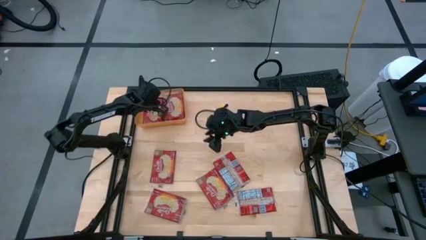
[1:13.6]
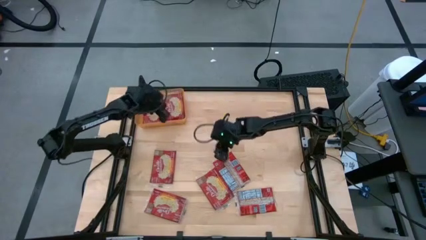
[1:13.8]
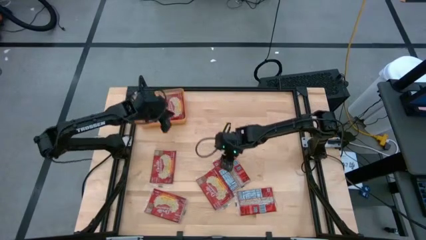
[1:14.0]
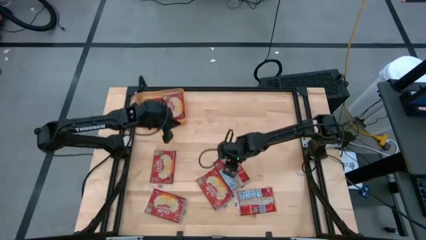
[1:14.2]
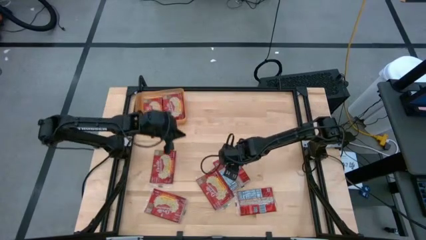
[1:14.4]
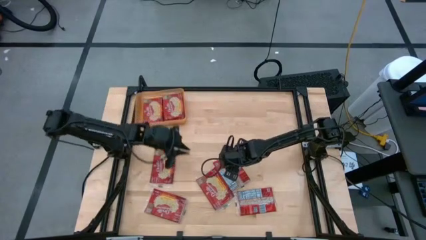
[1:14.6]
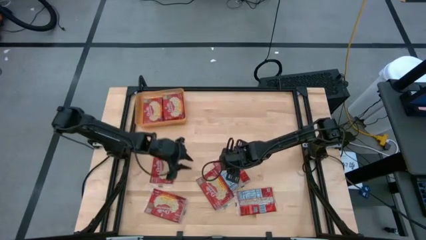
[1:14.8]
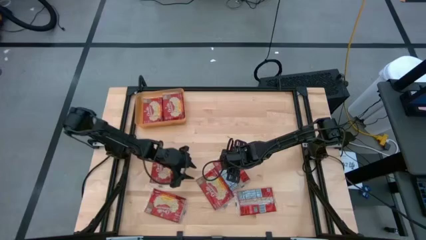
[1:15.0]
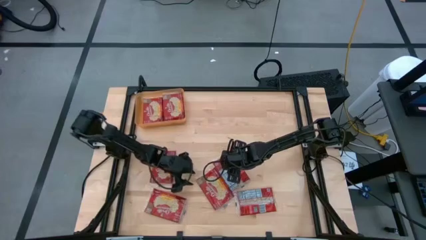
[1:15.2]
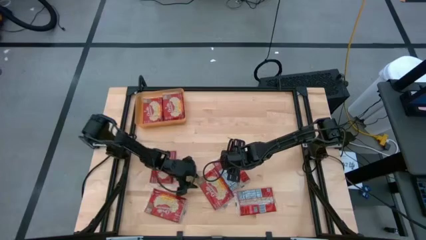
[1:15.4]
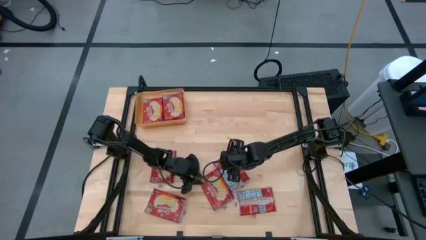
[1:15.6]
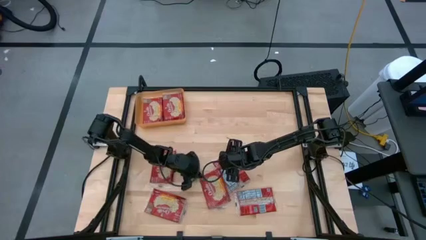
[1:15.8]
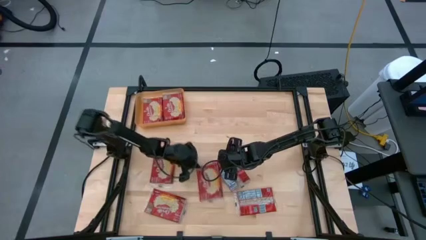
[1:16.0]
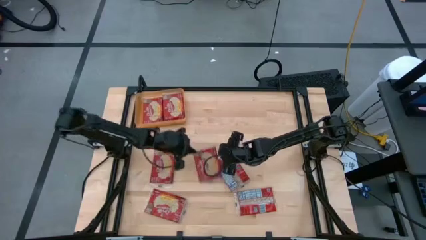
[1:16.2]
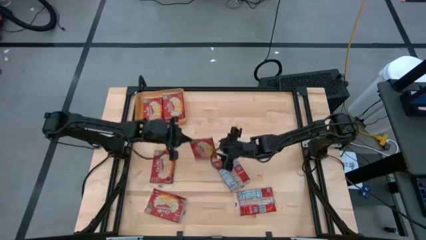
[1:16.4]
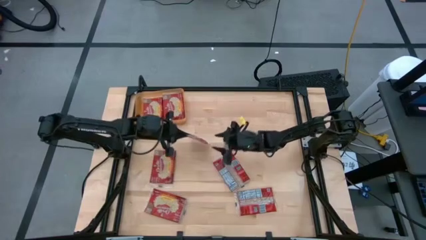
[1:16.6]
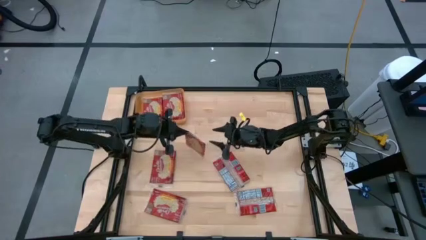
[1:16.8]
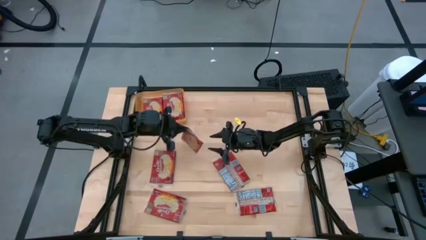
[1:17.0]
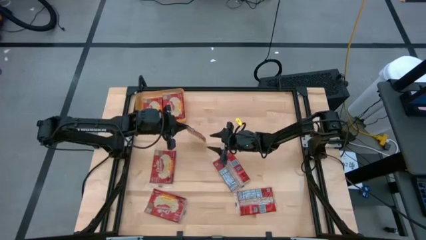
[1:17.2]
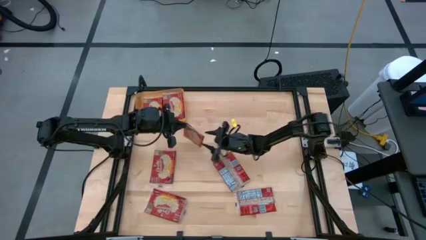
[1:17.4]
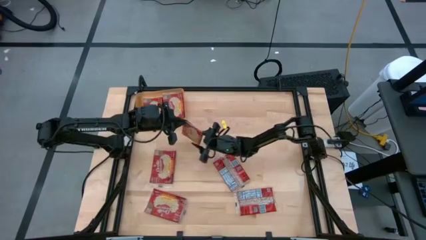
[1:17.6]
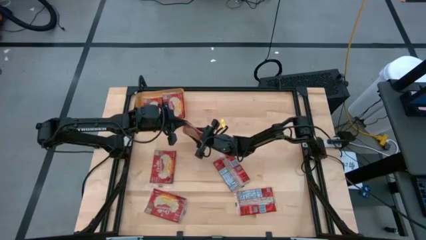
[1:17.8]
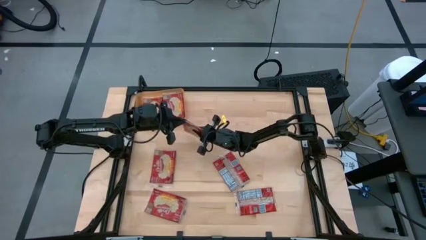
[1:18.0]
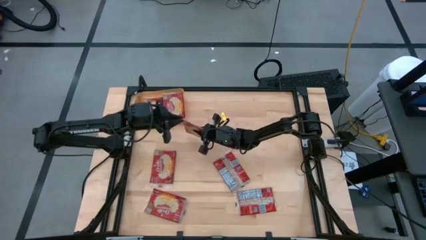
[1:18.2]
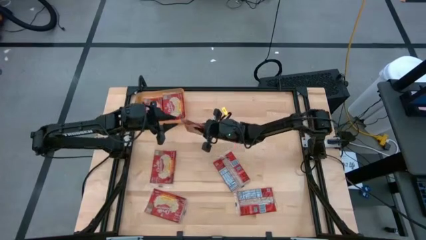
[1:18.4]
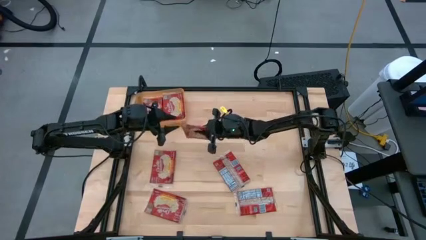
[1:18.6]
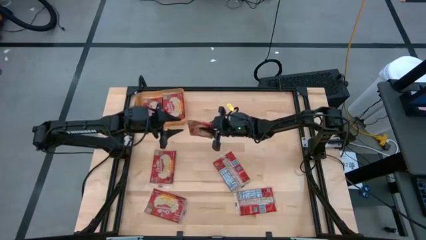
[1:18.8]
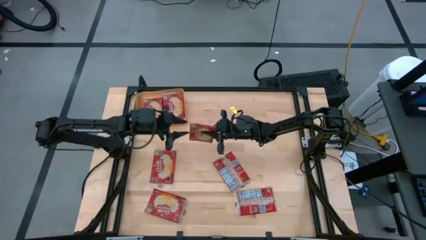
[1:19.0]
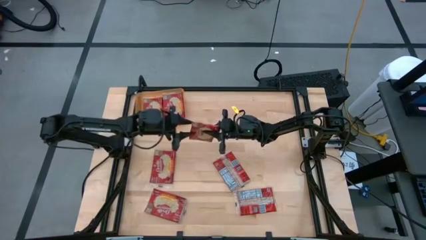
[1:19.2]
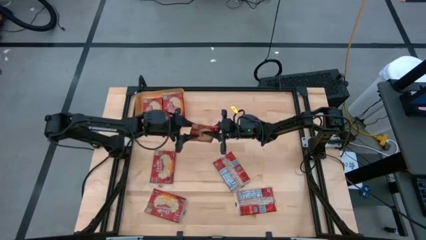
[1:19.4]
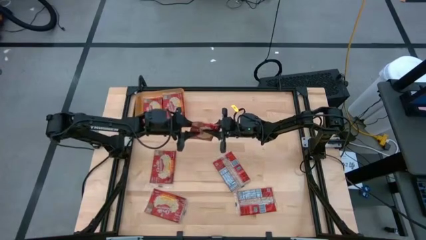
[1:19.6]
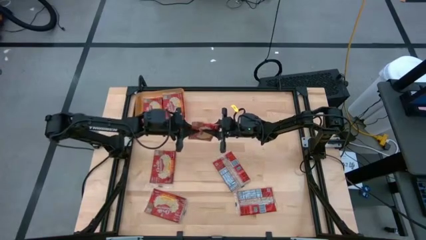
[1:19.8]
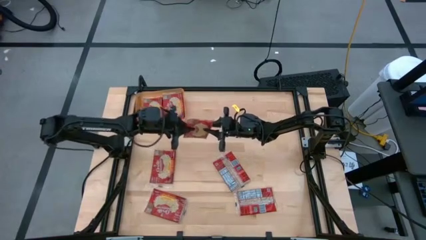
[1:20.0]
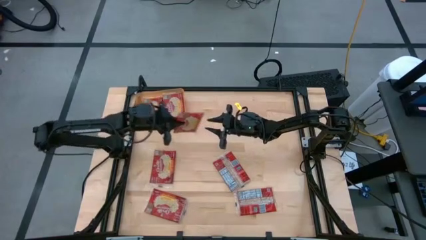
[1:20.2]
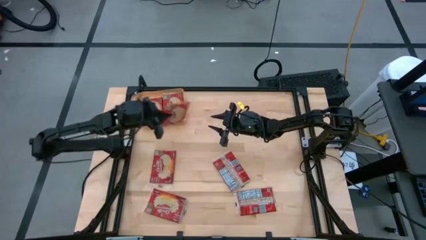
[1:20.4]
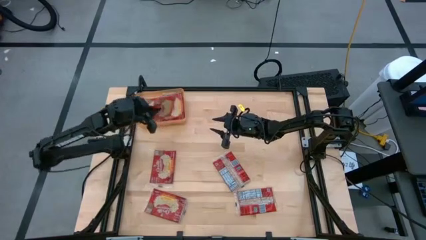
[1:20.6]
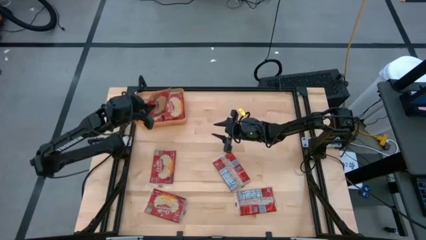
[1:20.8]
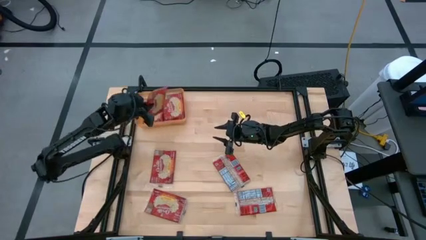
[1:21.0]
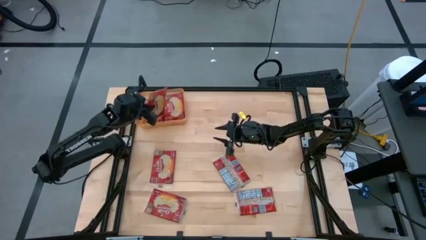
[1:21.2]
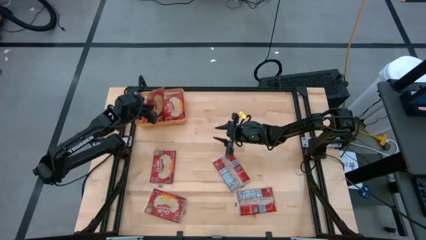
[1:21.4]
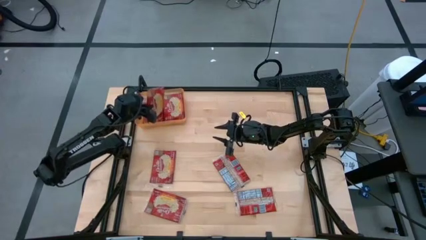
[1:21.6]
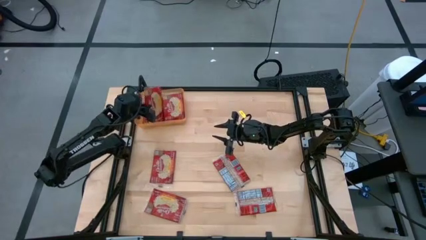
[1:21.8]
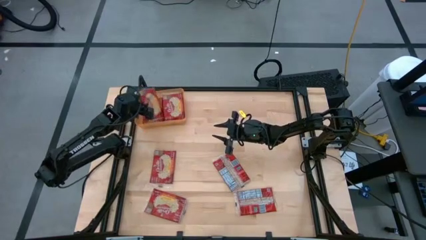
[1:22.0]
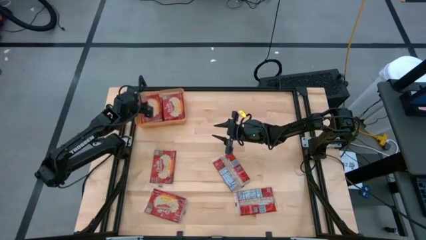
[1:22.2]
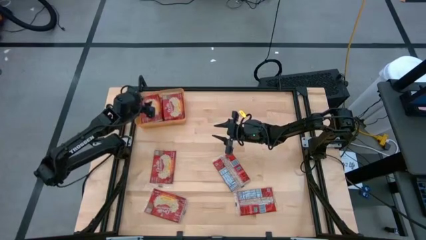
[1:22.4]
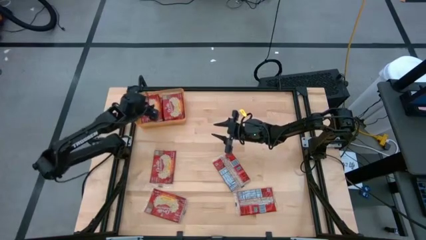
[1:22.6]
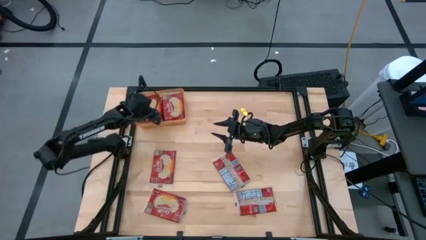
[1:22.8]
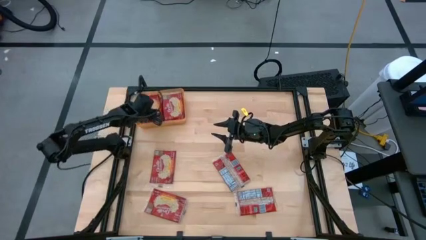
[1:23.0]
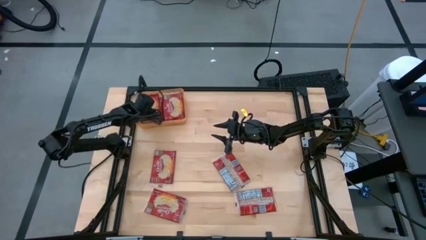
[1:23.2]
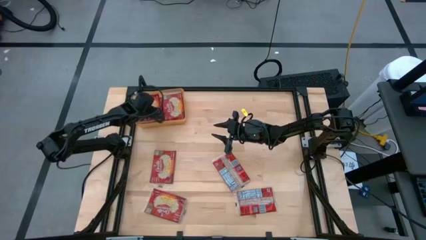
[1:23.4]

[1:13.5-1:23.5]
Task: Sort popcorn bags into baskets
Put the red popcorn bag into the orange bin

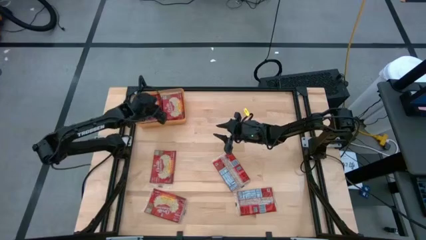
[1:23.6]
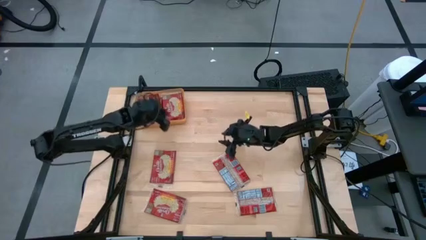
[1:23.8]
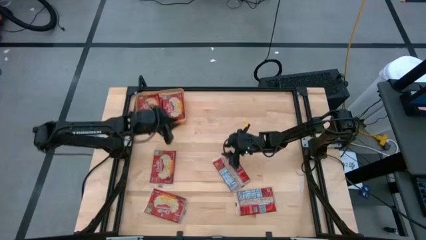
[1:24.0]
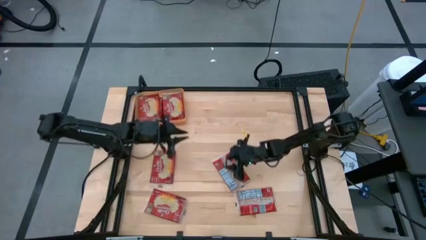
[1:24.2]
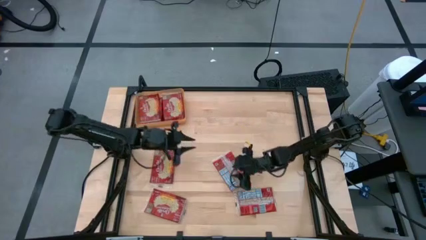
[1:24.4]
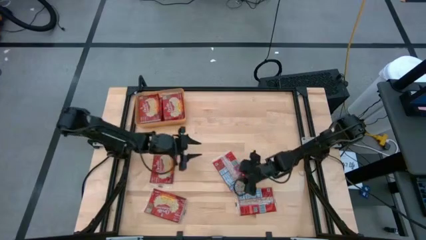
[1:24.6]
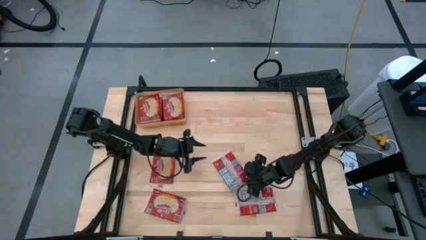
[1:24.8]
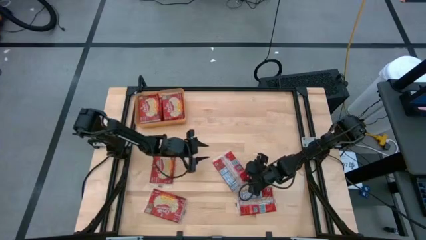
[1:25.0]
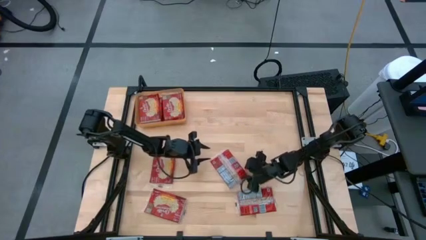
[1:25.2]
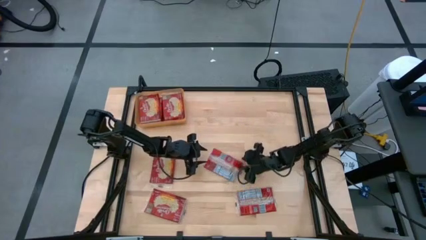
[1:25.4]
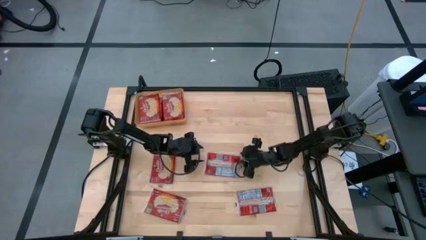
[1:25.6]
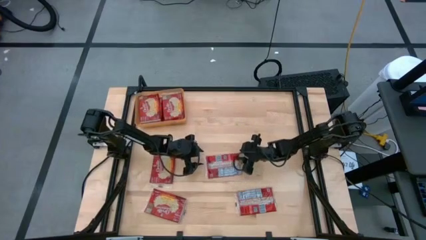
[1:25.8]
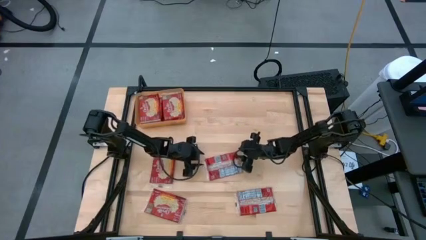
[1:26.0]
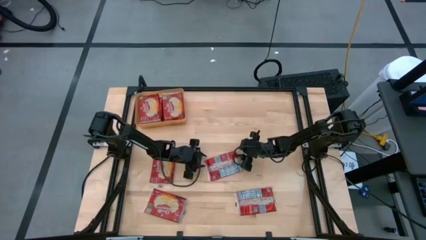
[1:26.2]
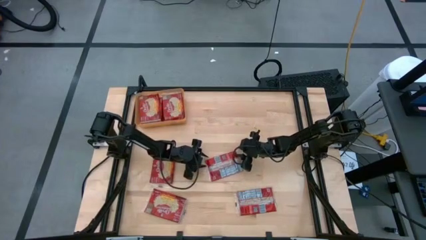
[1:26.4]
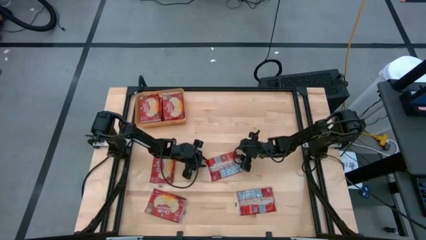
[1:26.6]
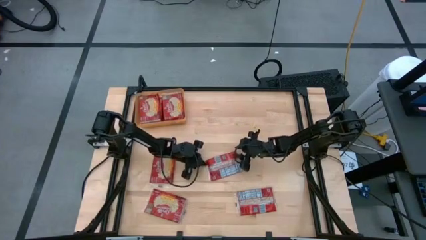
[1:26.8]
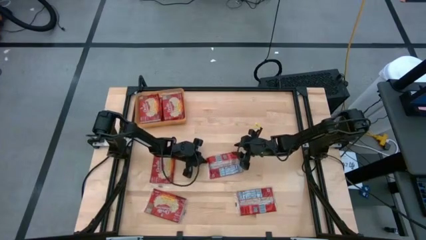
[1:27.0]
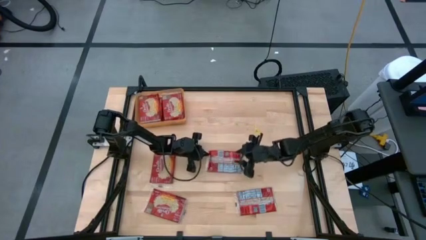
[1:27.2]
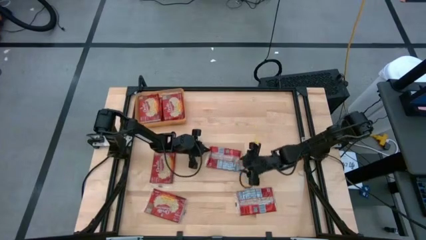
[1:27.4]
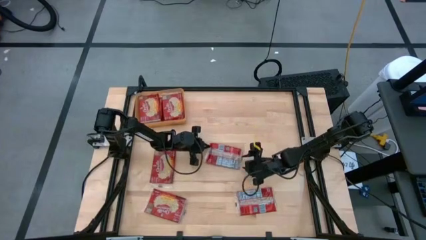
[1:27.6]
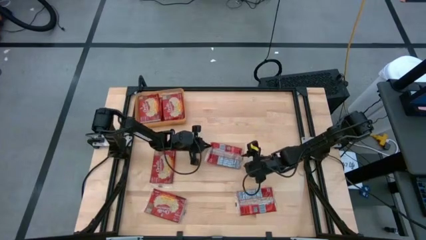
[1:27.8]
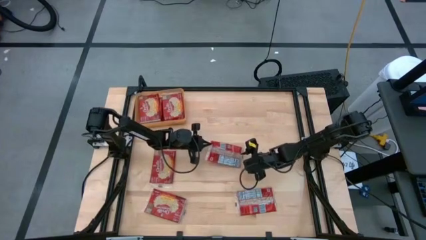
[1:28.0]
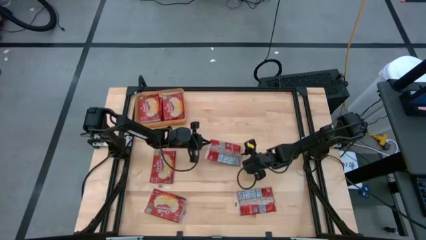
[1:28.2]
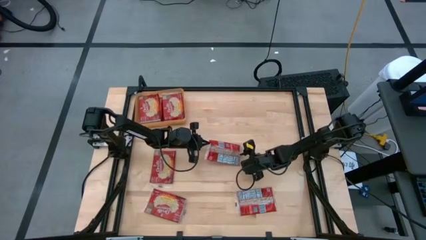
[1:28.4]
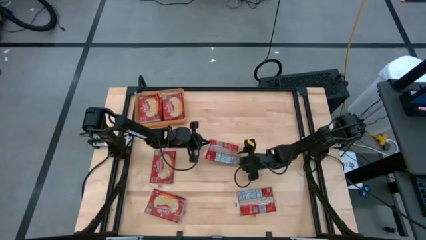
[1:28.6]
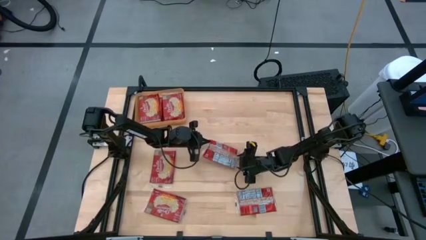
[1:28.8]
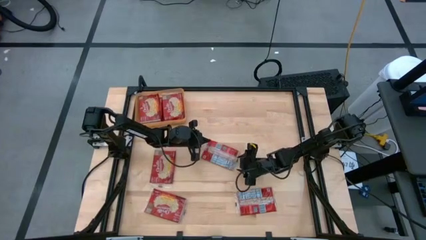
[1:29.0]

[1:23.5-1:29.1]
Put the red popcorn bag into the orange bin
